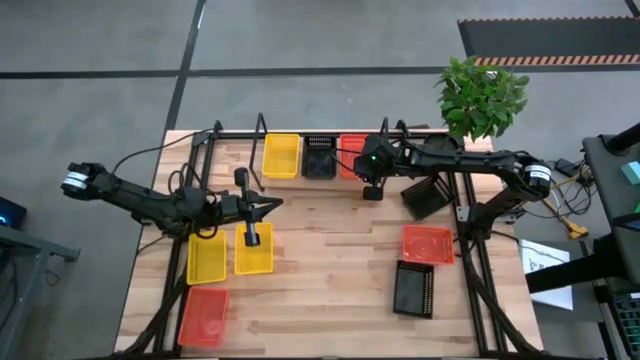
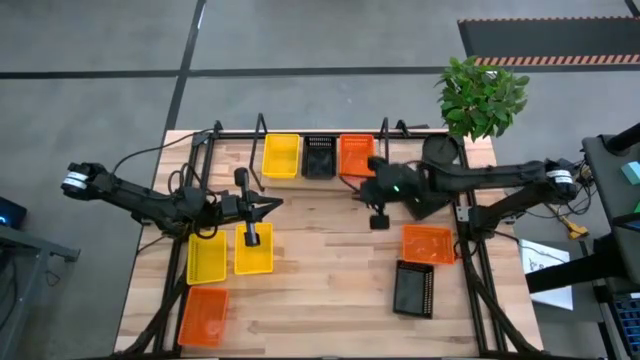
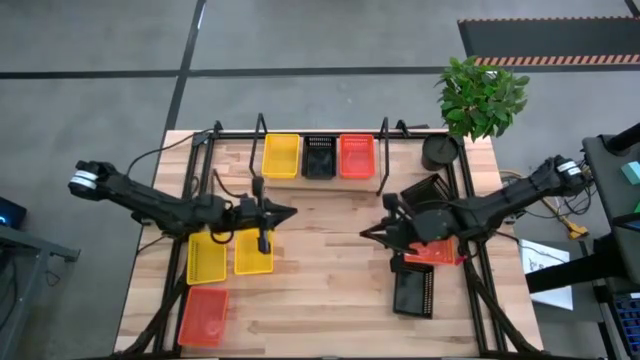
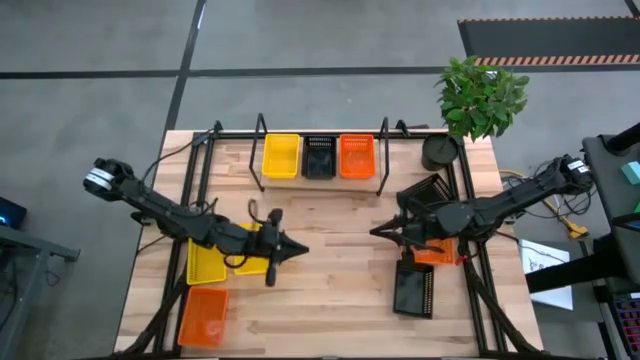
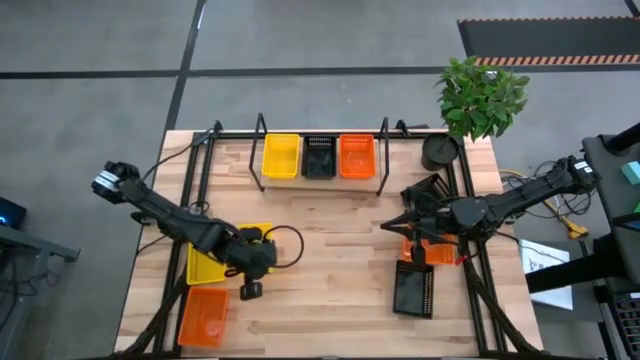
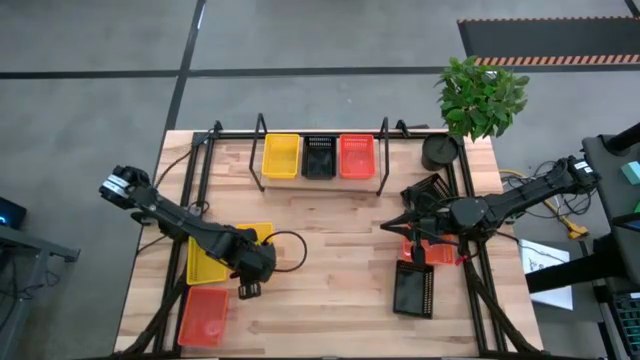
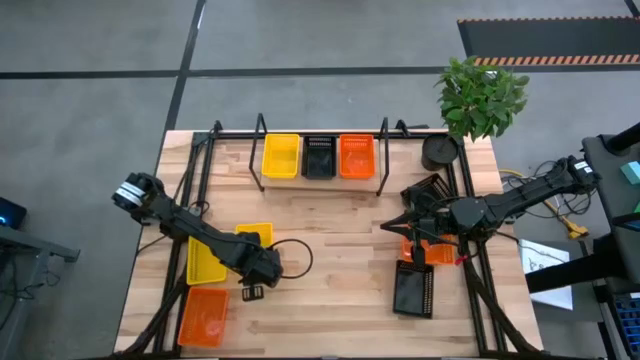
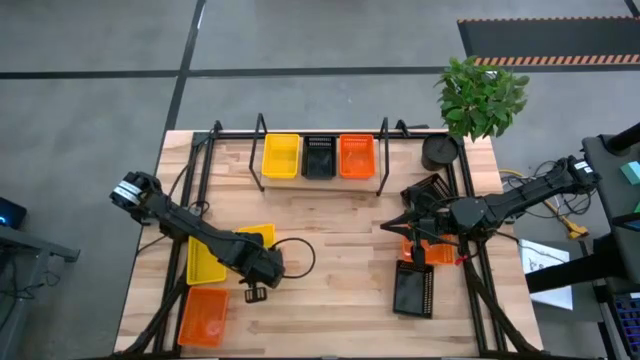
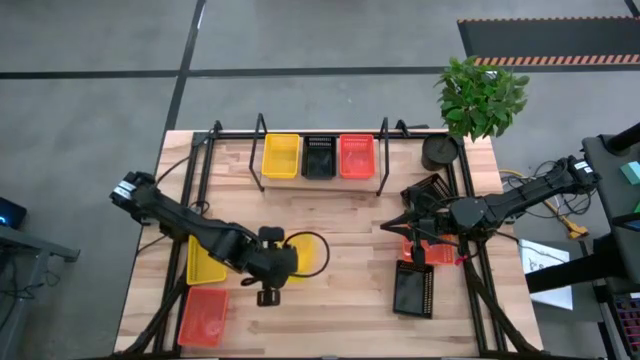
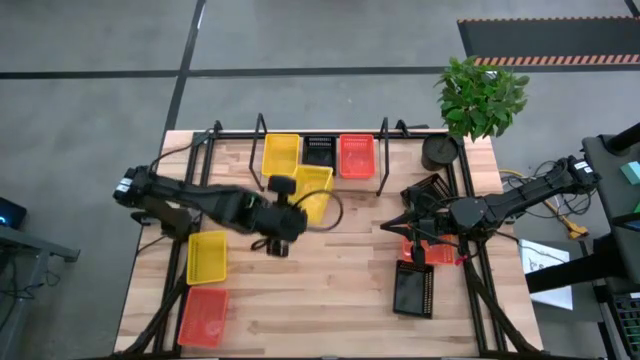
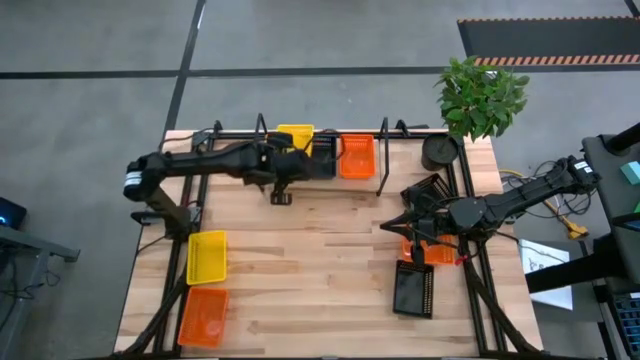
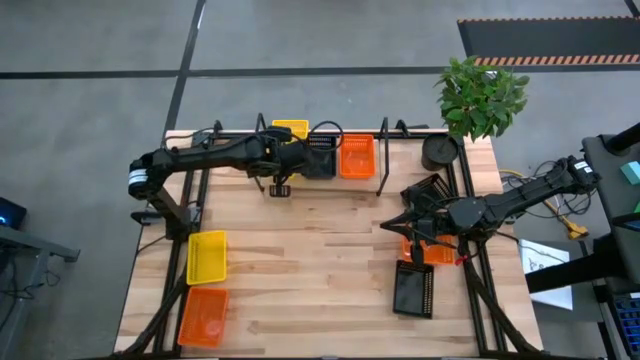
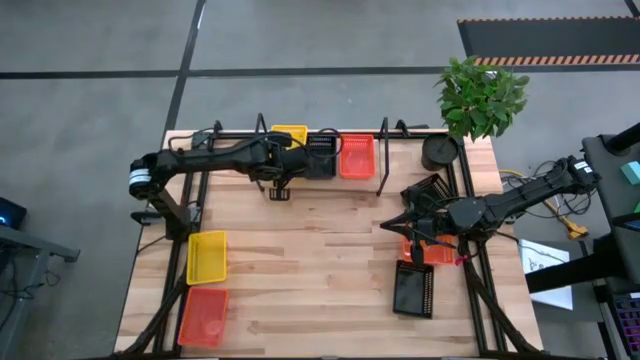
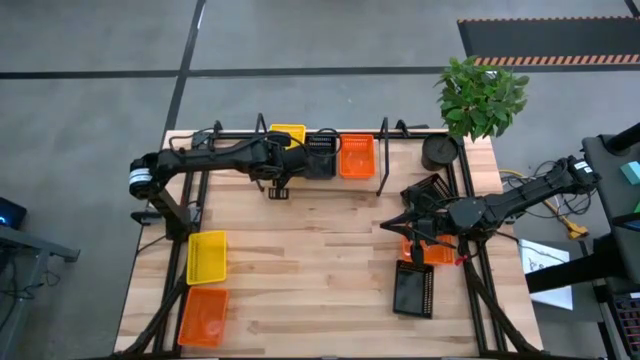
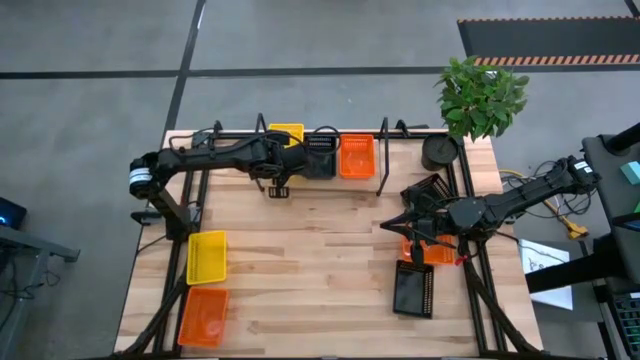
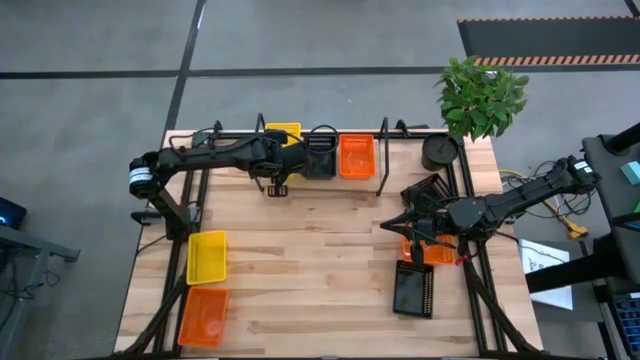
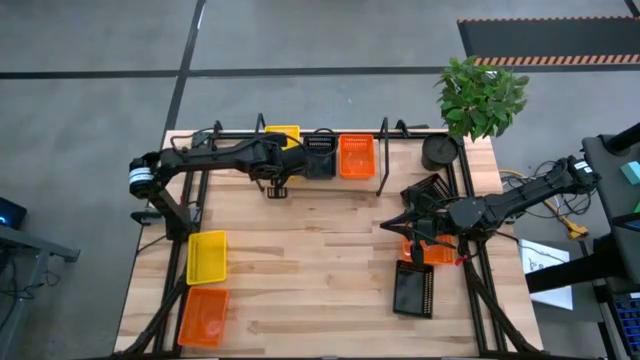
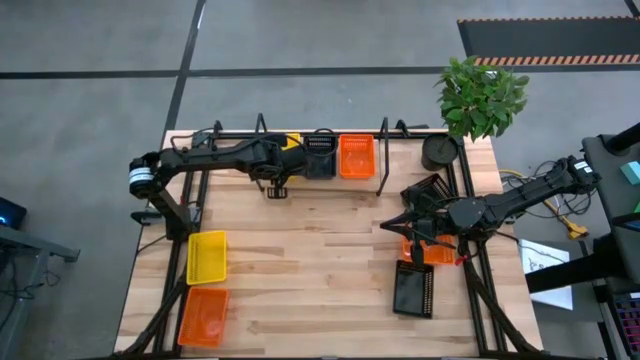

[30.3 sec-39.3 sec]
Task: Stack baskets on shelf by color
Stack the right yellow bin on top of the other yellow bin on the shelf

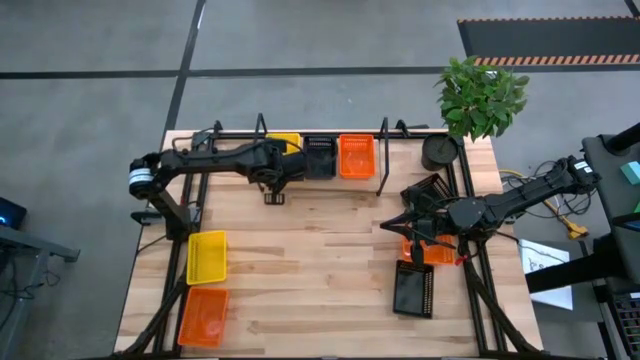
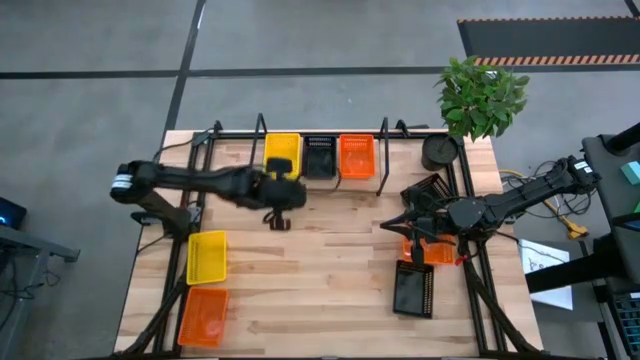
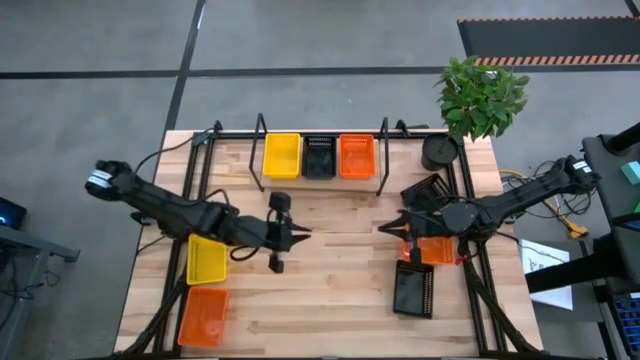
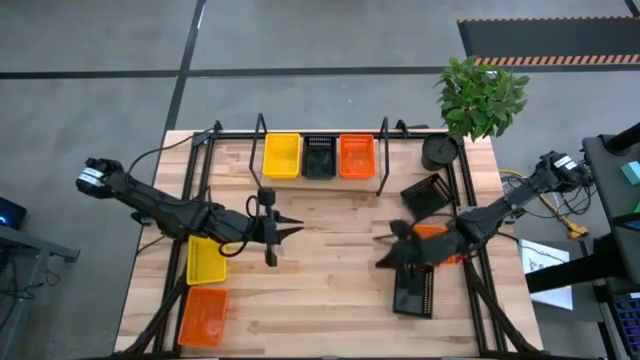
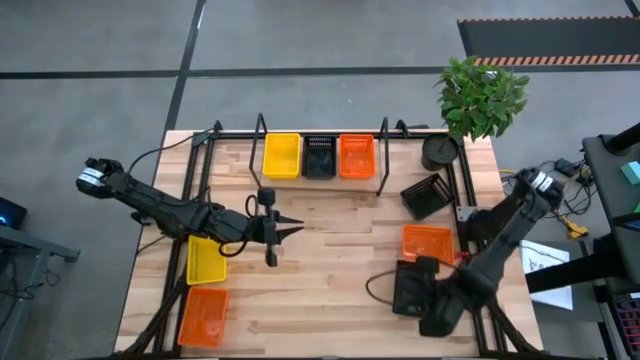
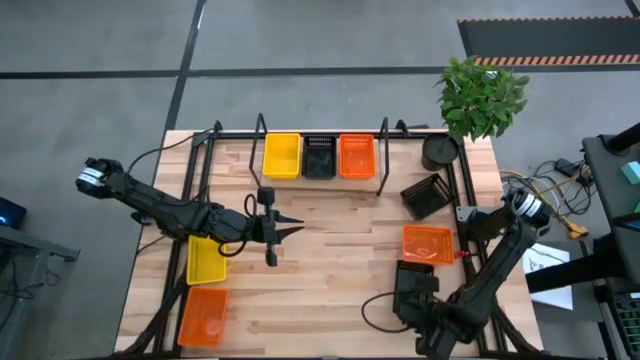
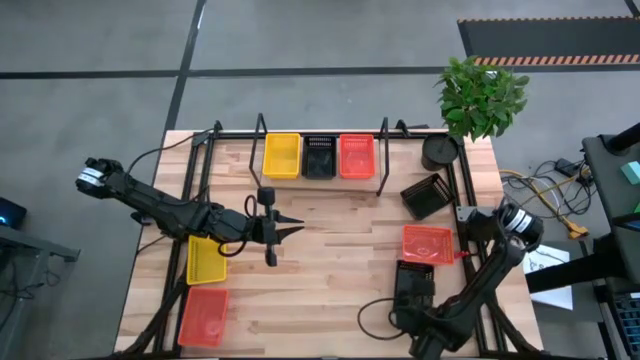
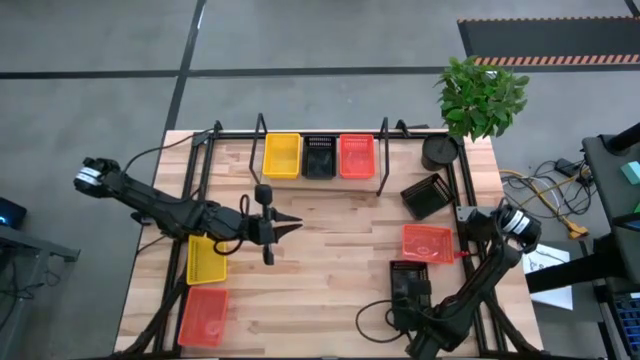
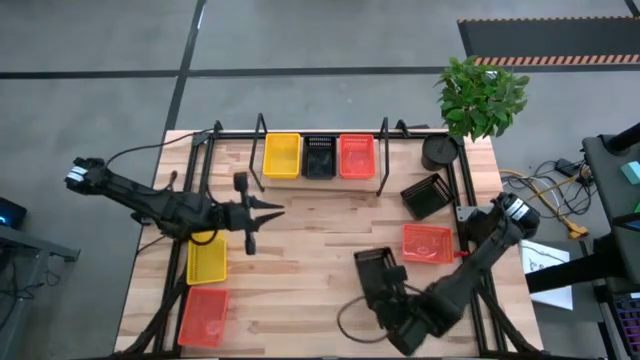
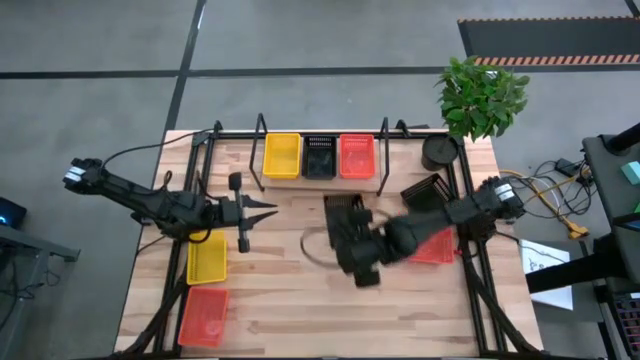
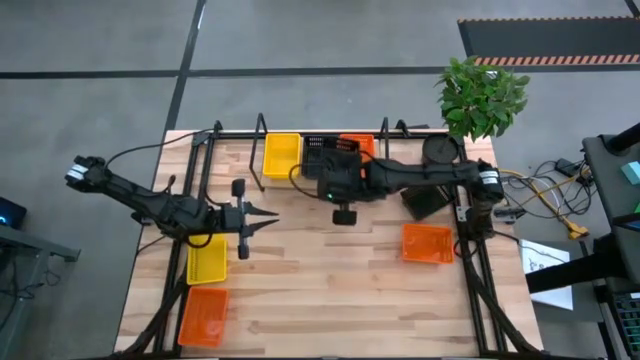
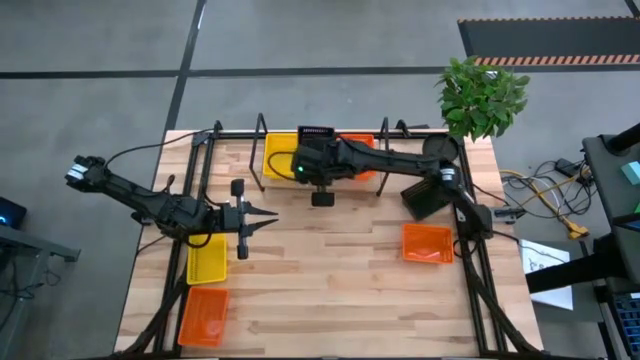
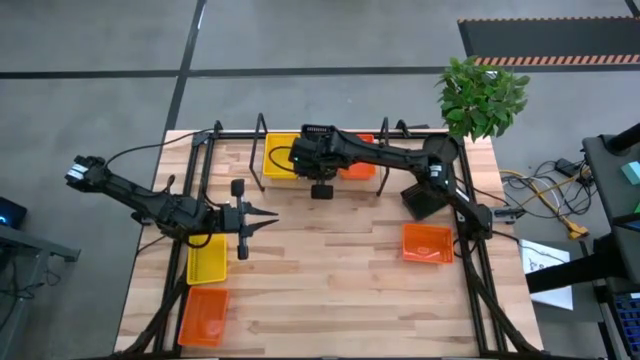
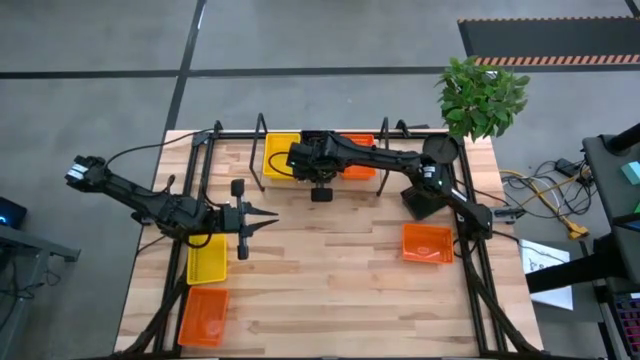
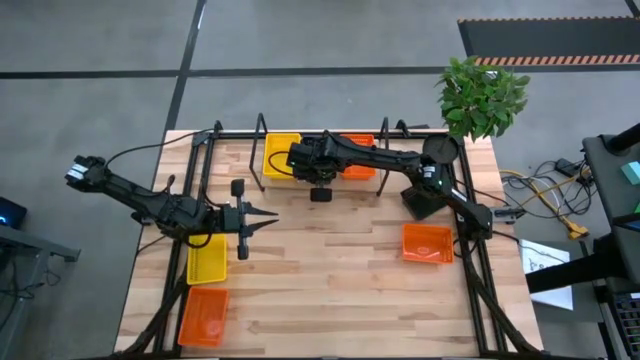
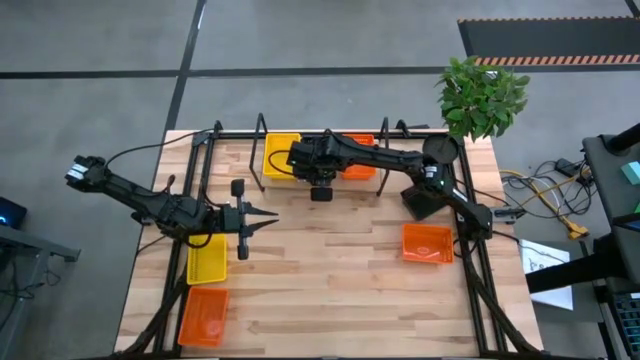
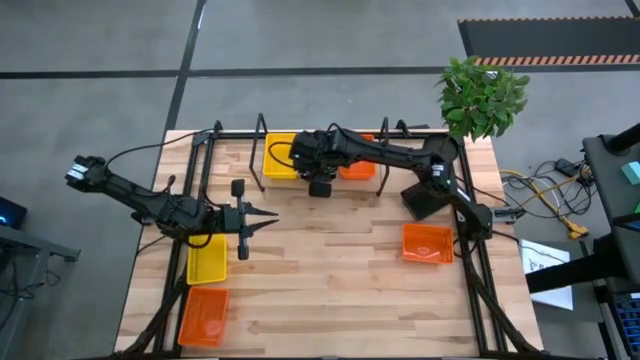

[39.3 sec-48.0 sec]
Stack the bottom black bin on top of the other black bin on the shelf

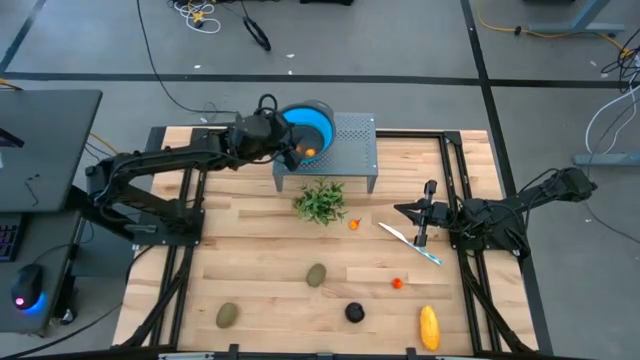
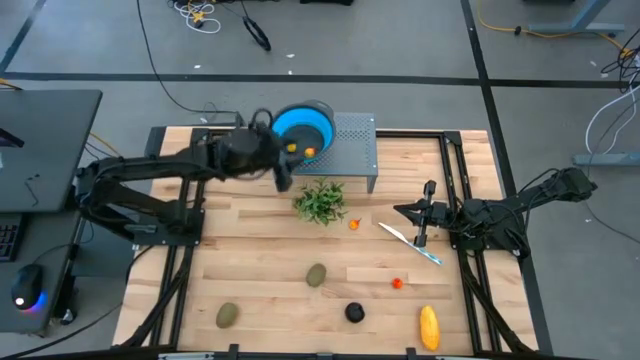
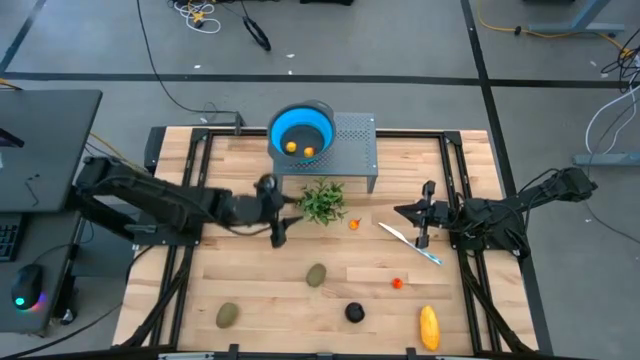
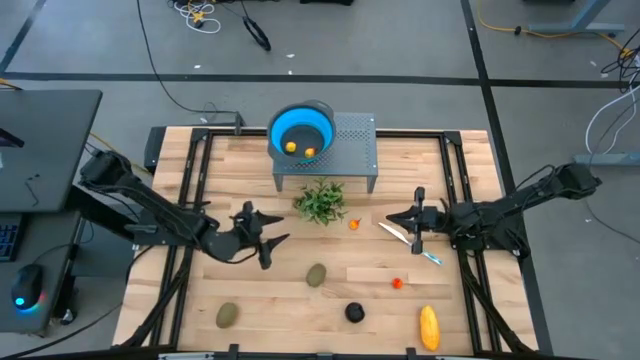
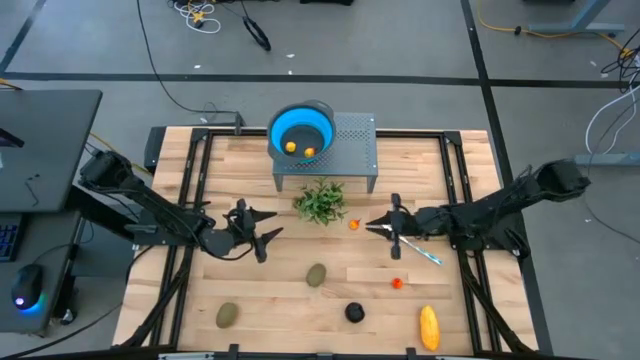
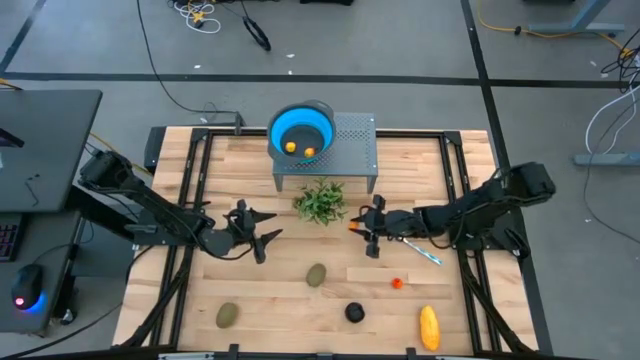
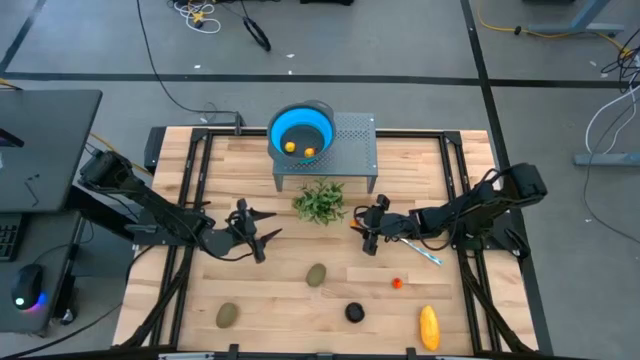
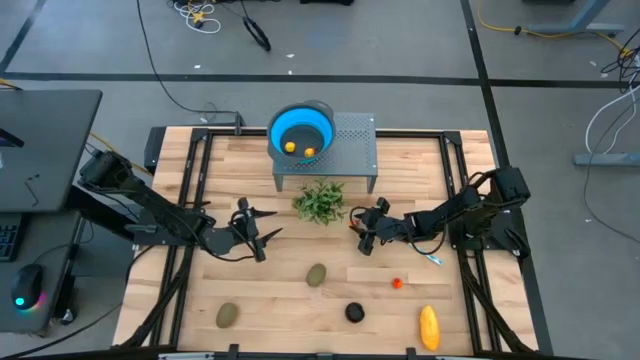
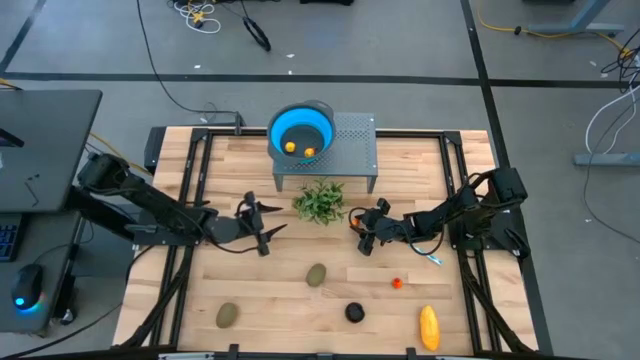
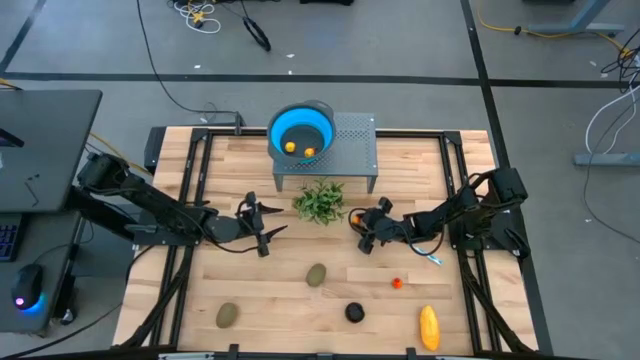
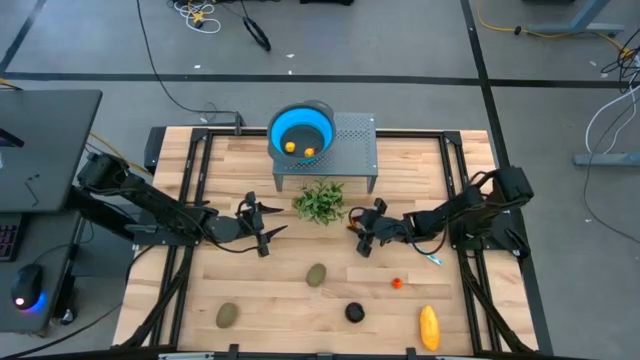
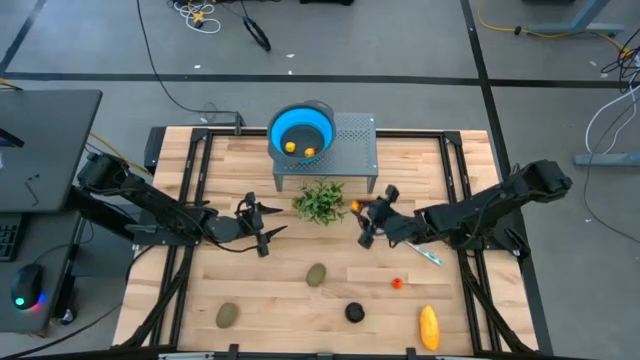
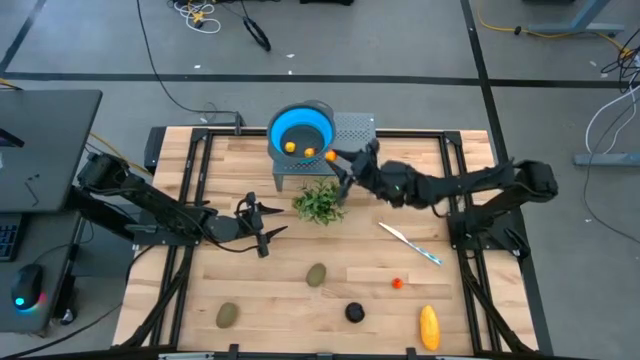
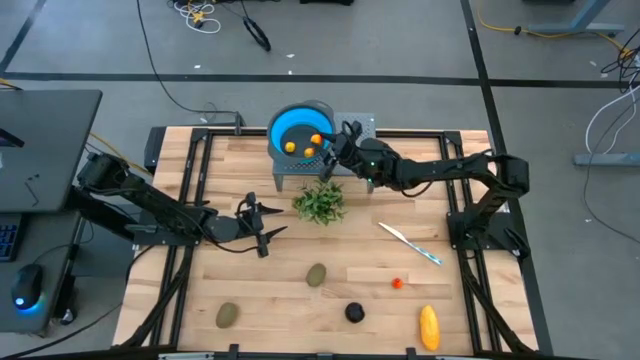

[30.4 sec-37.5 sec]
Task: Pick & Place Fruit
Put the orange pear into the blue strainer bowl on the shelf
